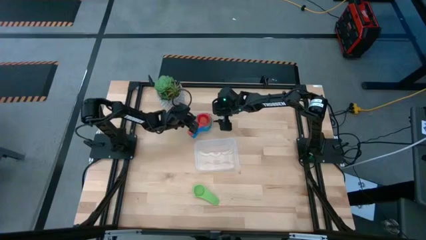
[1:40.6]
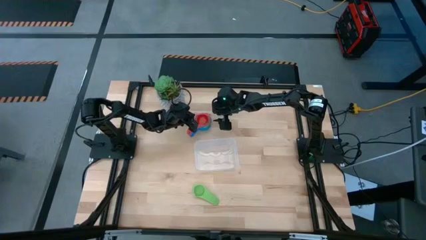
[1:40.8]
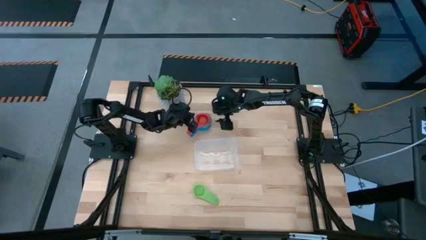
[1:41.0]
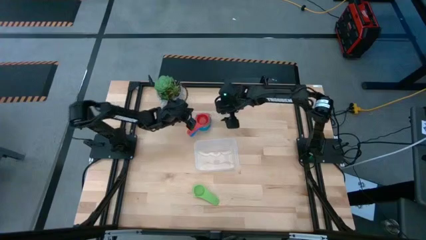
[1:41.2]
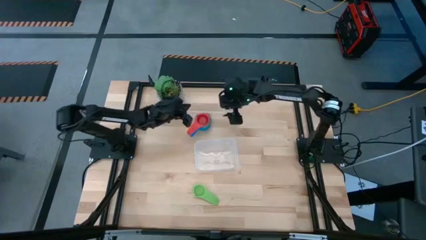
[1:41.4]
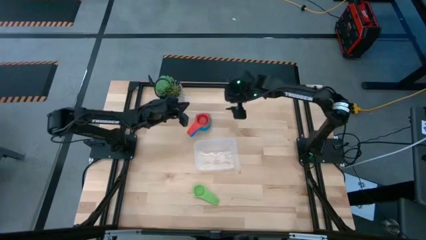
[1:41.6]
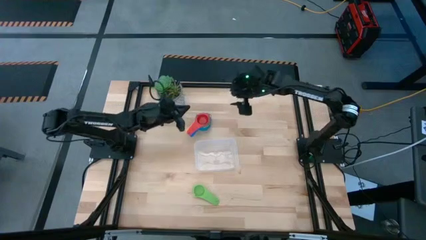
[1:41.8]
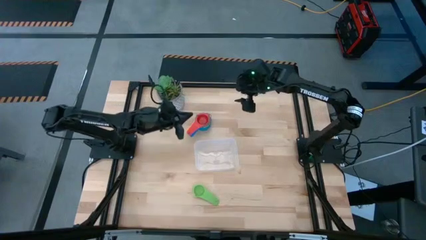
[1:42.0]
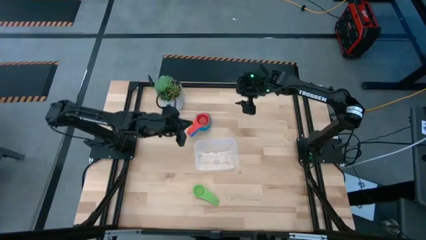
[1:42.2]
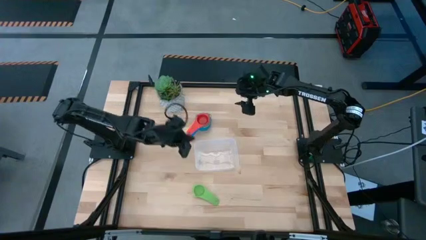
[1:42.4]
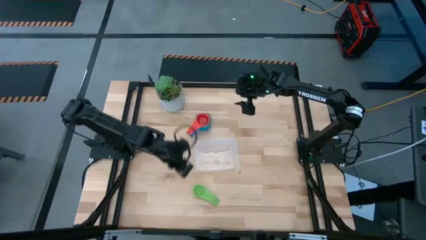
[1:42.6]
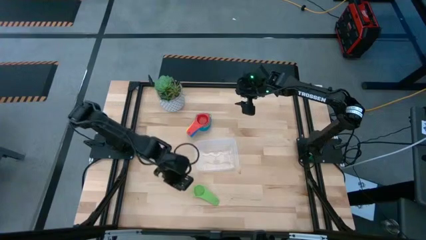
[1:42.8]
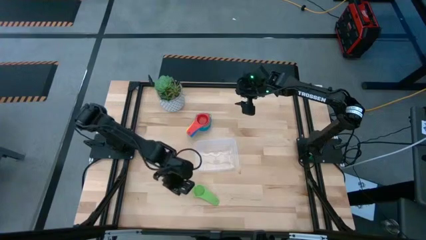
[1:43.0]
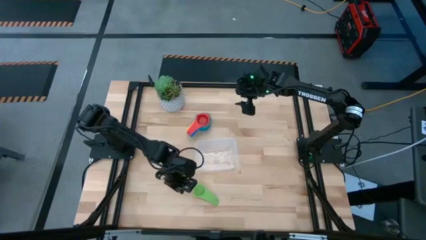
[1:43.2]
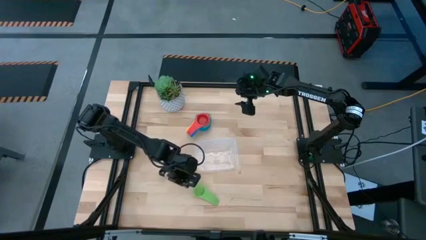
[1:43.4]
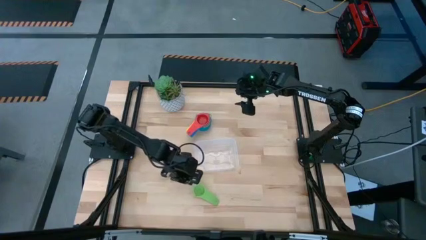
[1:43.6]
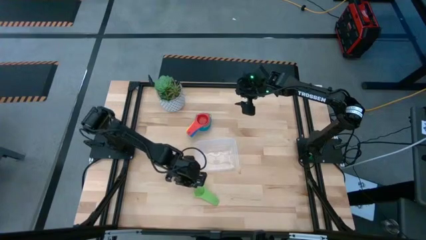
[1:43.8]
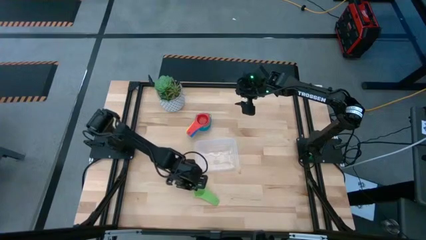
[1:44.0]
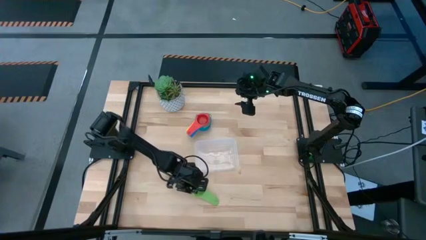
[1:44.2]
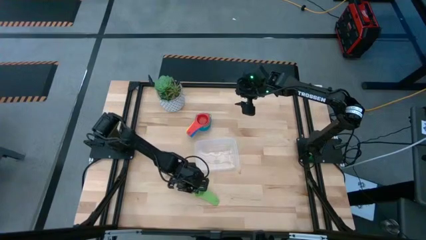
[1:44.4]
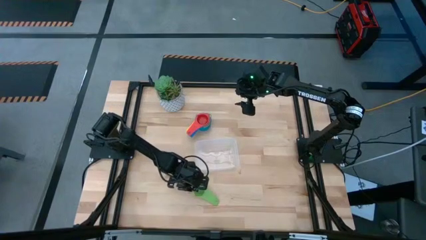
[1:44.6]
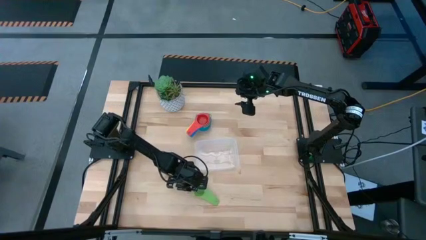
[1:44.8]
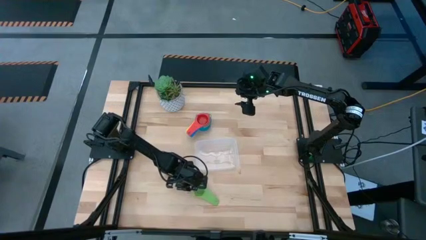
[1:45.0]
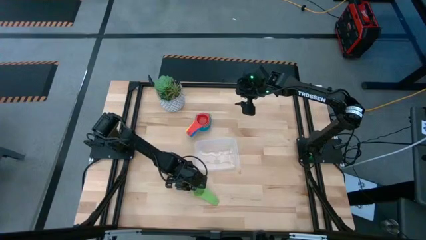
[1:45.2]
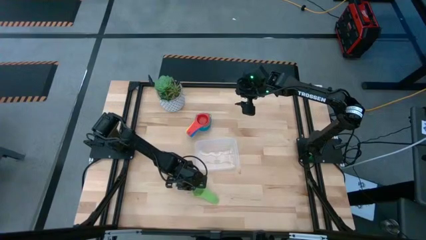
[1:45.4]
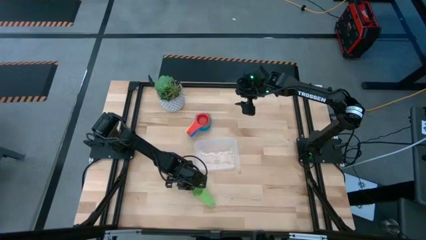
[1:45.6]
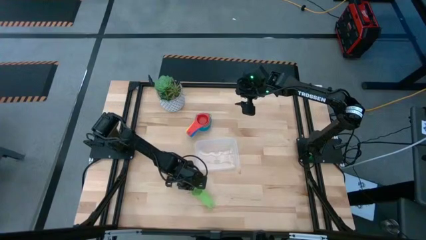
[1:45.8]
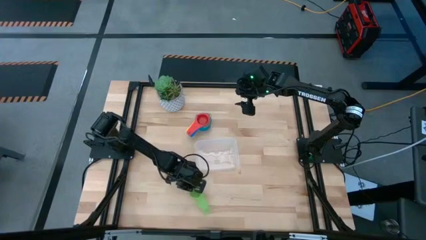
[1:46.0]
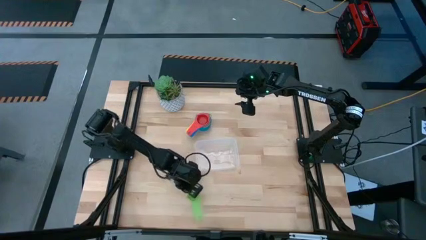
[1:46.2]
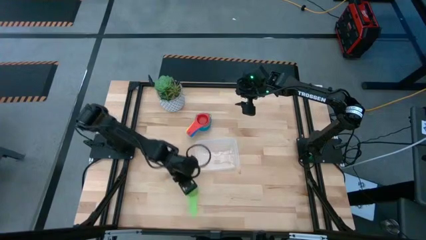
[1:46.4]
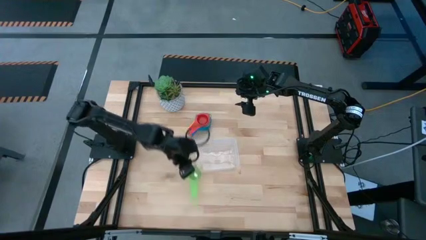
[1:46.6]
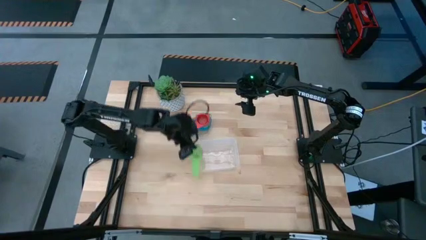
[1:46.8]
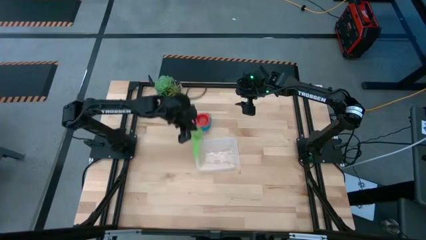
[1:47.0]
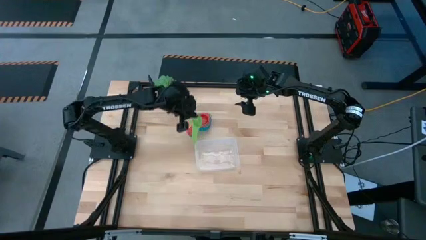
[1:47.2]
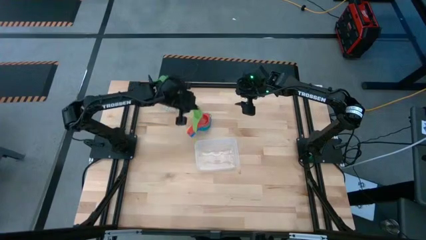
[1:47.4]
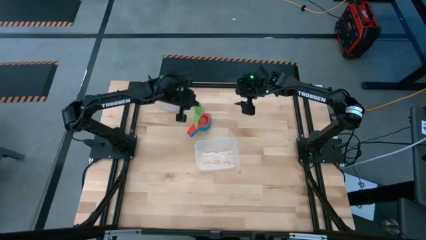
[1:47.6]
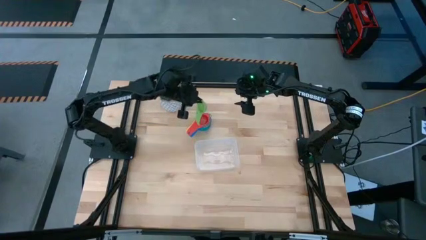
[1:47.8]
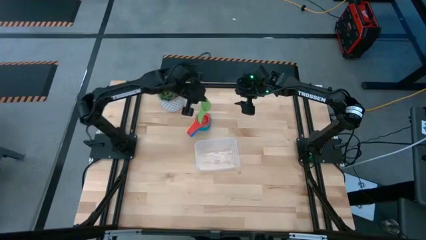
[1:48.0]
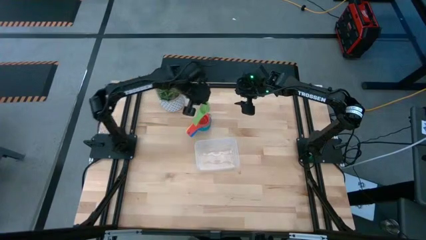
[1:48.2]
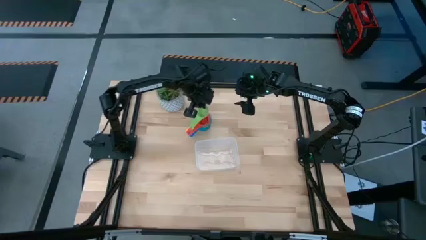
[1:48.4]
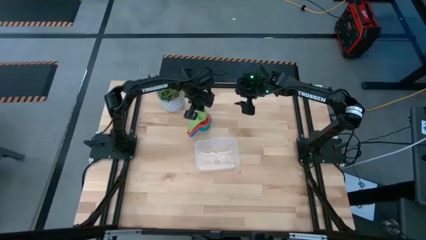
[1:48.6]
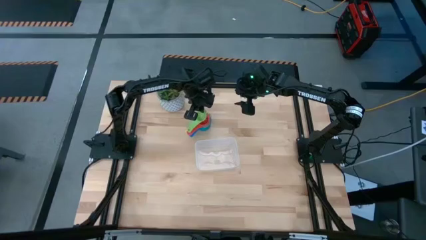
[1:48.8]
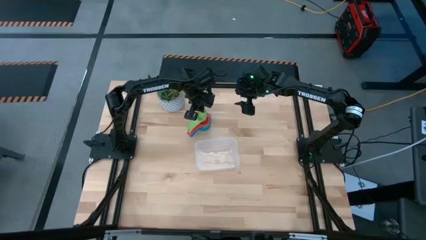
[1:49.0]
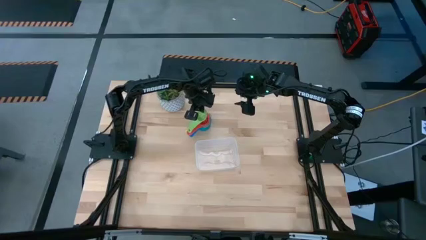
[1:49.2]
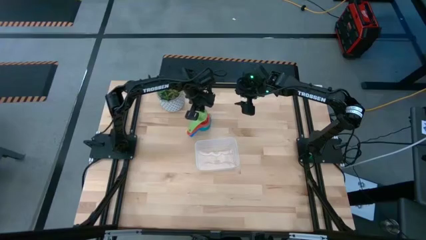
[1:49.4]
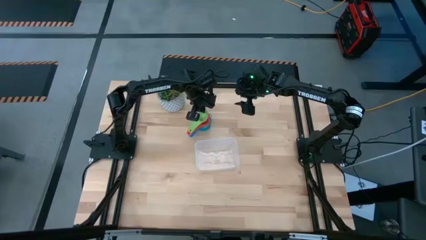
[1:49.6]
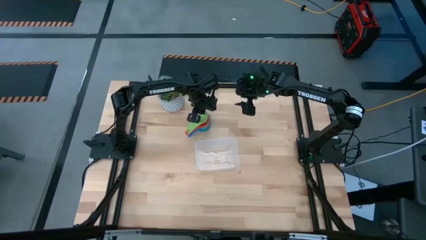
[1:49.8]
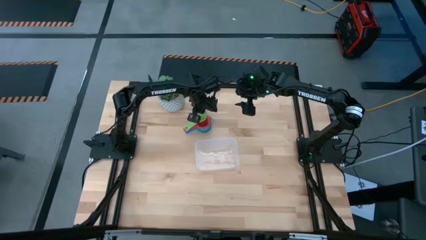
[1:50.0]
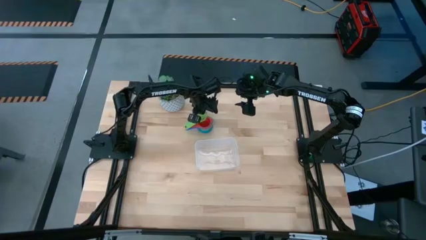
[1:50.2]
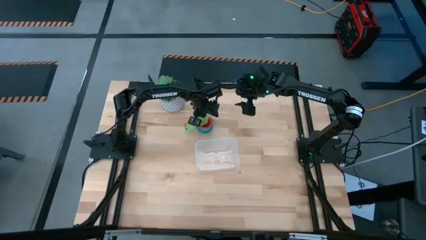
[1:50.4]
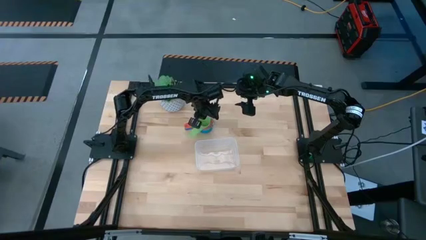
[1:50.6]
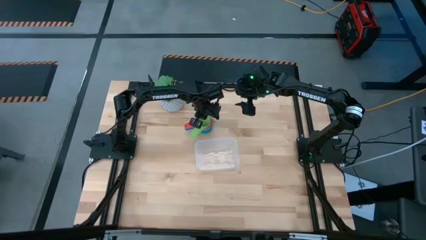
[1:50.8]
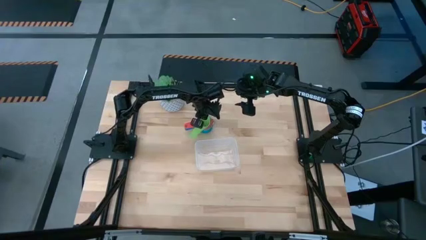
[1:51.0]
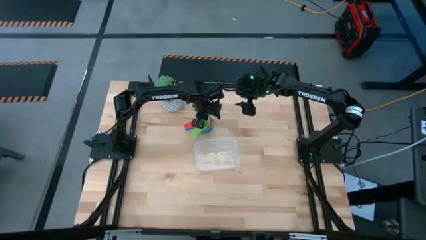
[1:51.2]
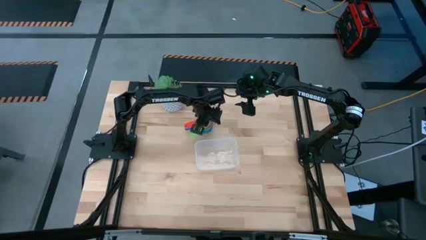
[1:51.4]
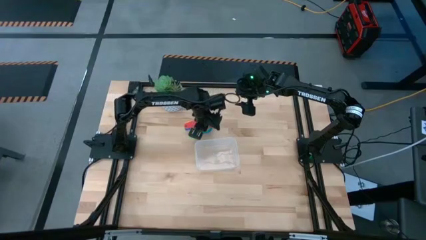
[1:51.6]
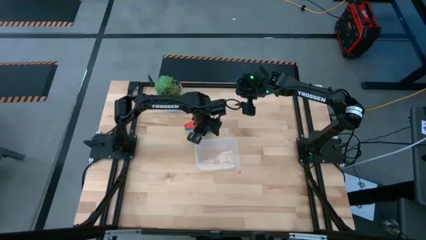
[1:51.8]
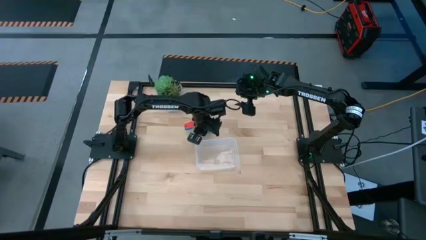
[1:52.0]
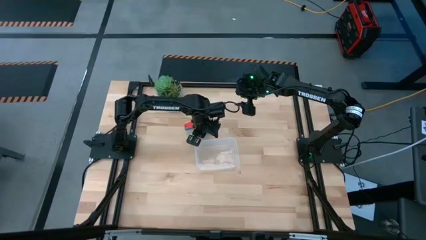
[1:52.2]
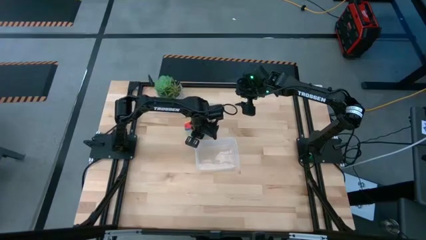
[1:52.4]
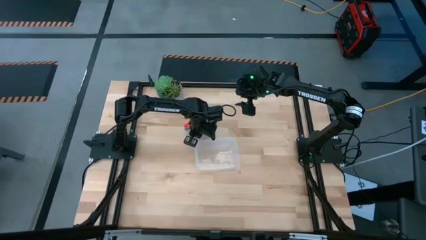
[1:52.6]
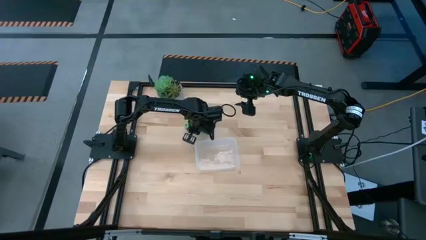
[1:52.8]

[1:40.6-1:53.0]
Task: Nest measuring cups in basket
Stack the green measuring cup on top of the red measuring cup

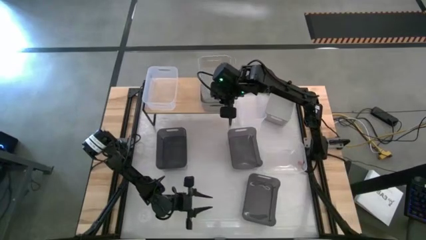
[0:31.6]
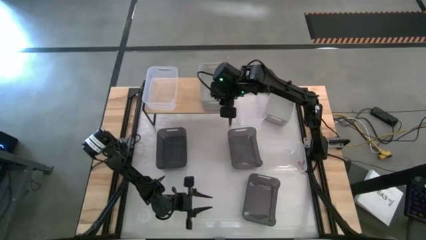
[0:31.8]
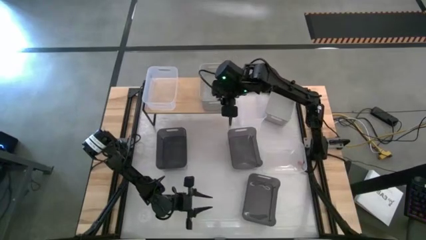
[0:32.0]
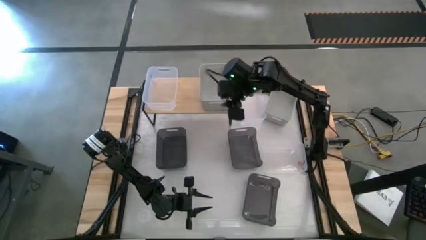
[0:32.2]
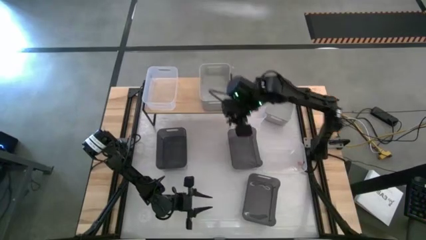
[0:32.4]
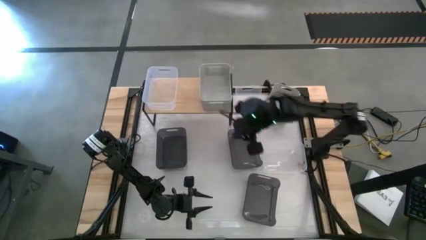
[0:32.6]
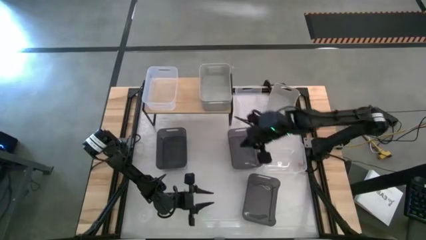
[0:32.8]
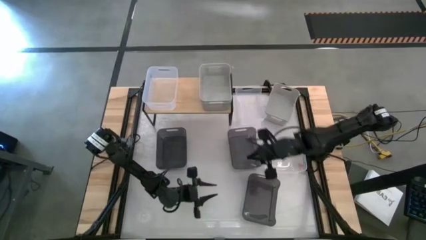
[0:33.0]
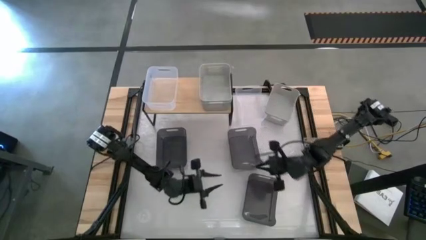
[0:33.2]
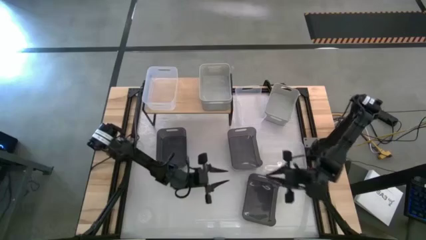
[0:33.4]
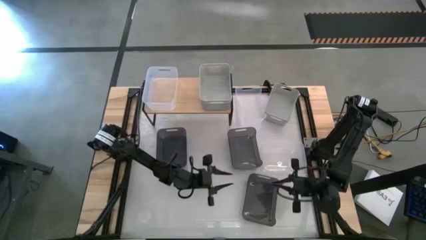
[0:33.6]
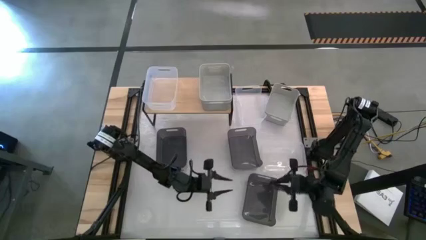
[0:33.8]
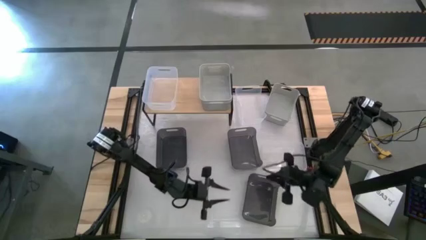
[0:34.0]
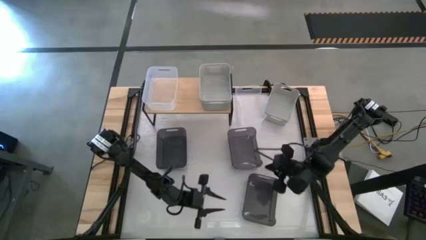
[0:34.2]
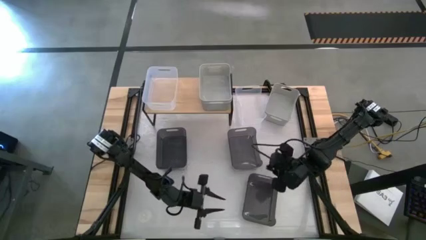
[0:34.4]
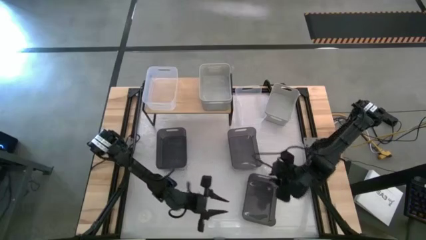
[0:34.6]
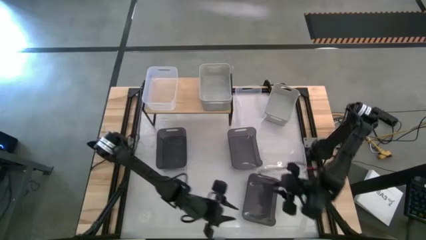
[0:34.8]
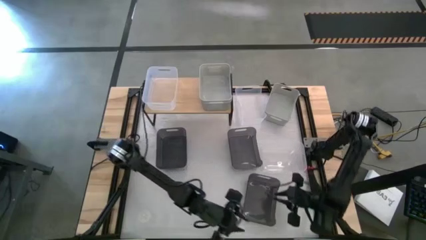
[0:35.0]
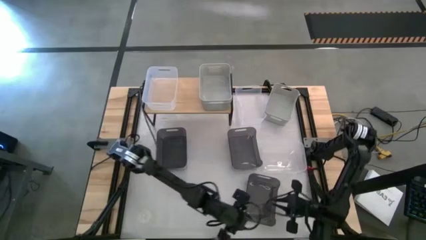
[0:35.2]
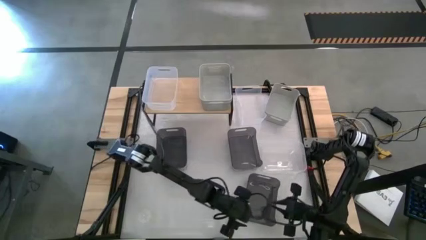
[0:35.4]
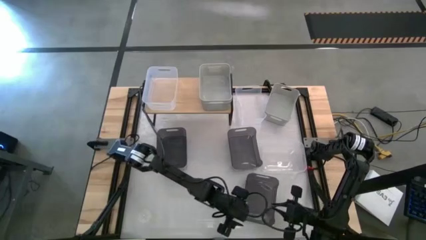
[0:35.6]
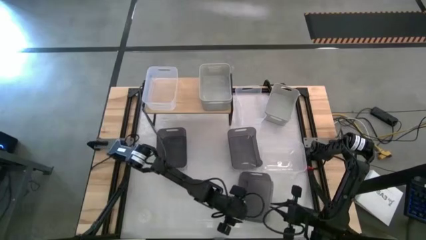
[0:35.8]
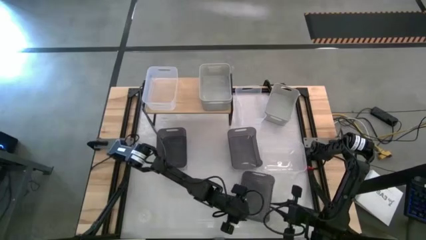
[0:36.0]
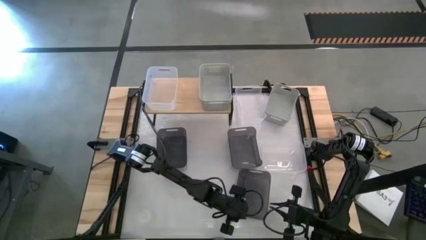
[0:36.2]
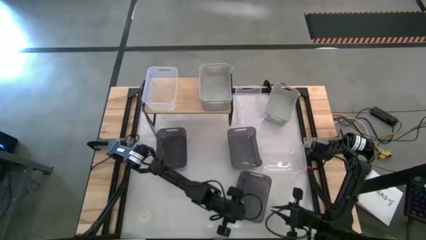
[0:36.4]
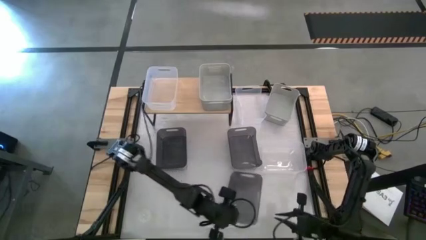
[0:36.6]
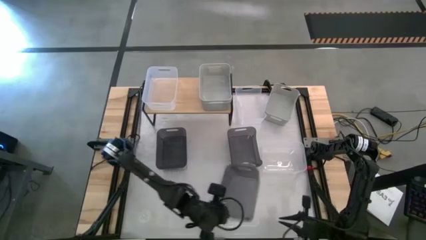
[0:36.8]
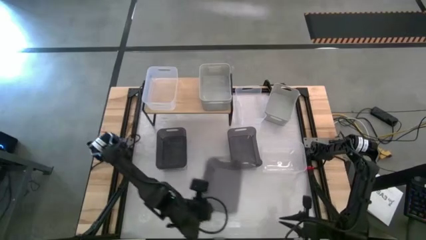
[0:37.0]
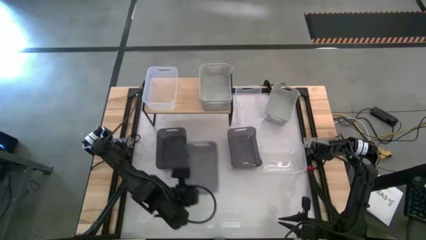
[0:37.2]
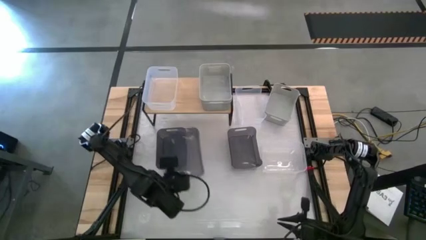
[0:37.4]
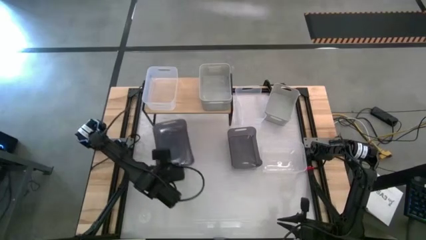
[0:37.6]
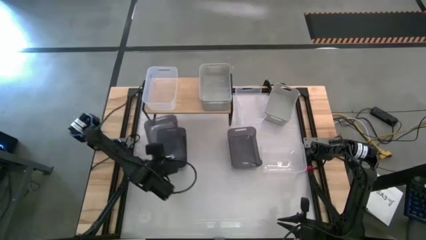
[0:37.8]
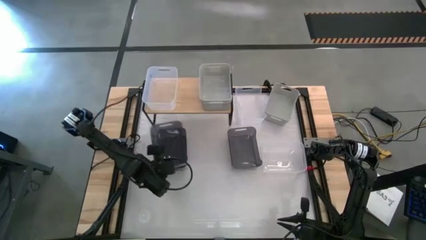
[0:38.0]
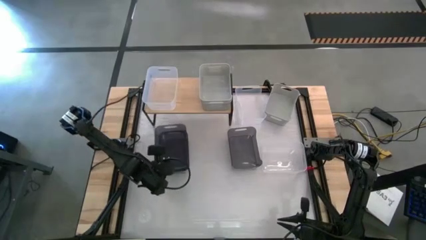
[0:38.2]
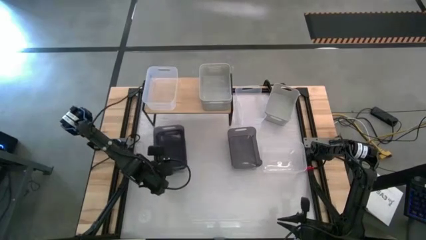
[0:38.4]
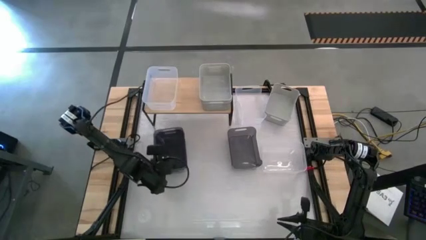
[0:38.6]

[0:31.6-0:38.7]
Task: Stack baskets on shelf by color
Stack the bottom black bin on top of the top black bin
